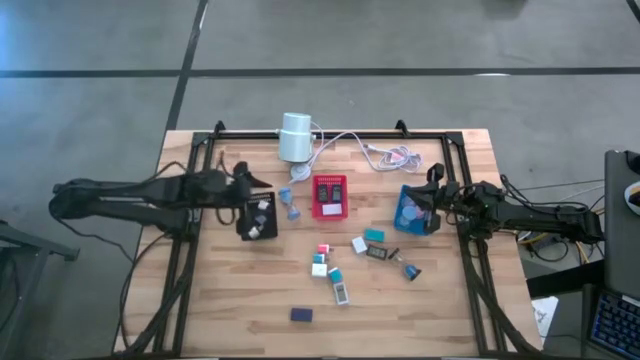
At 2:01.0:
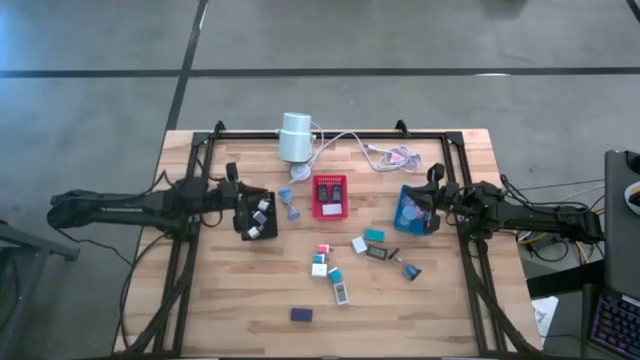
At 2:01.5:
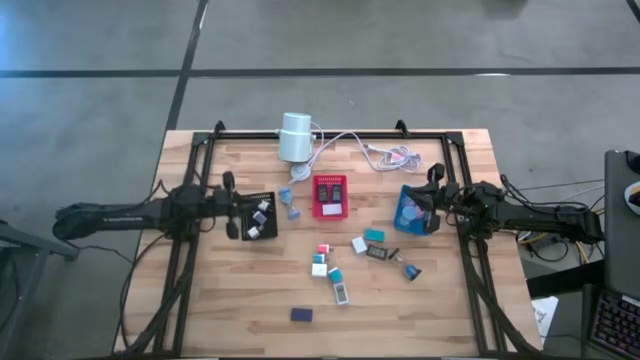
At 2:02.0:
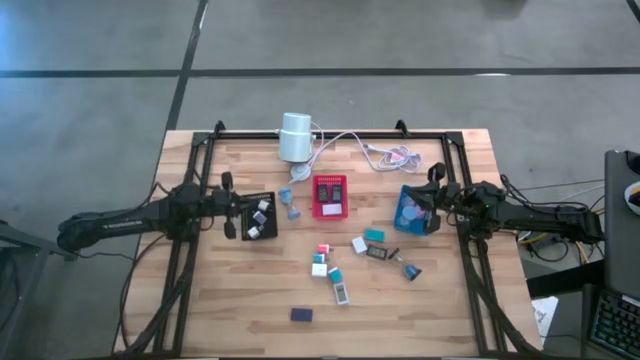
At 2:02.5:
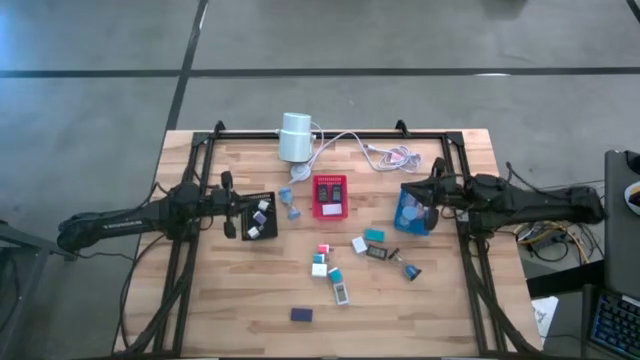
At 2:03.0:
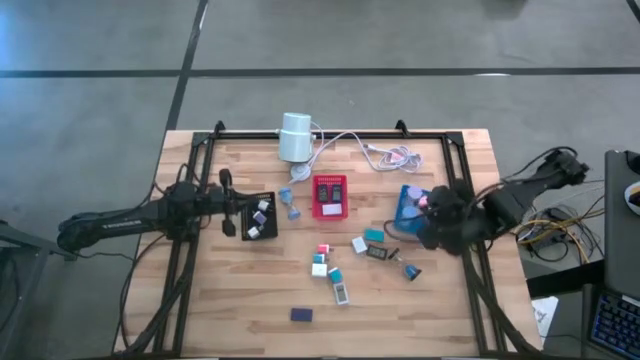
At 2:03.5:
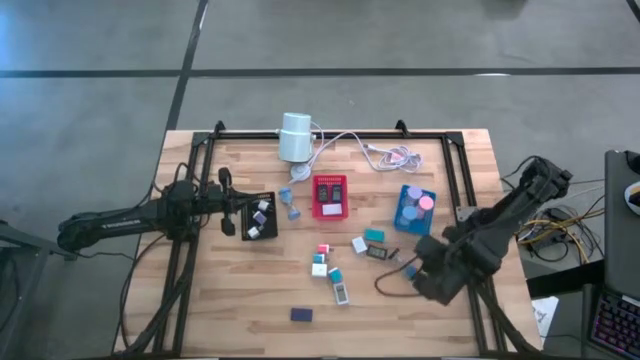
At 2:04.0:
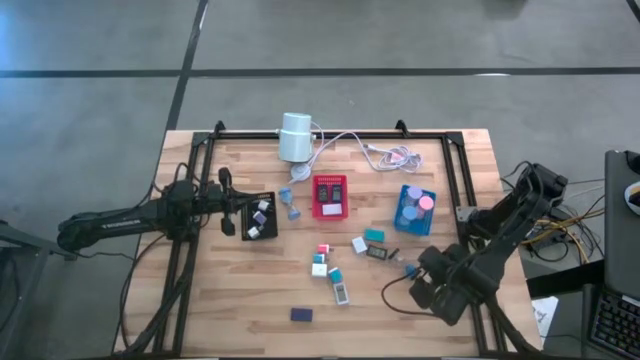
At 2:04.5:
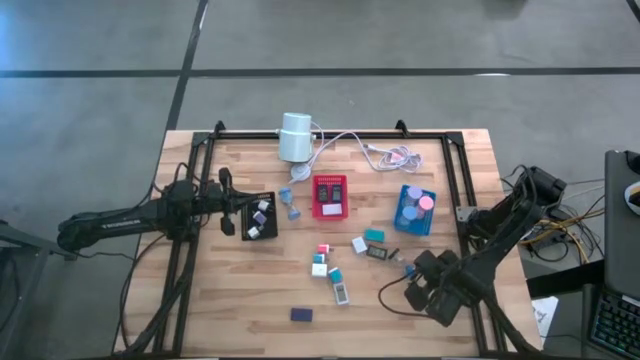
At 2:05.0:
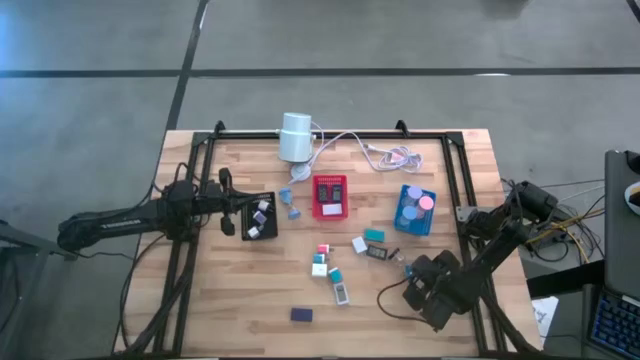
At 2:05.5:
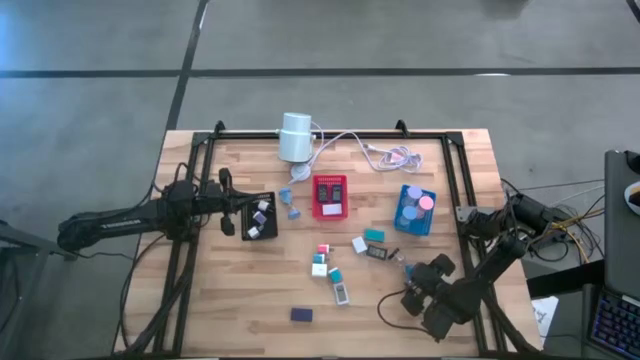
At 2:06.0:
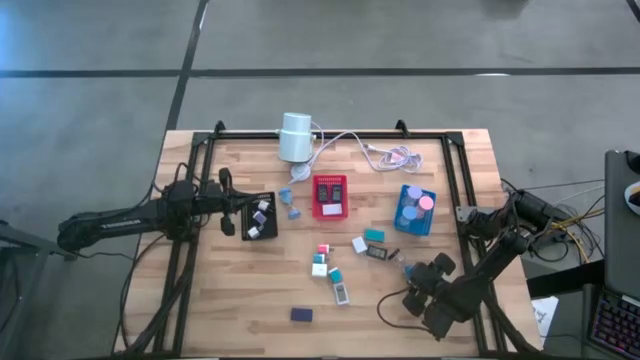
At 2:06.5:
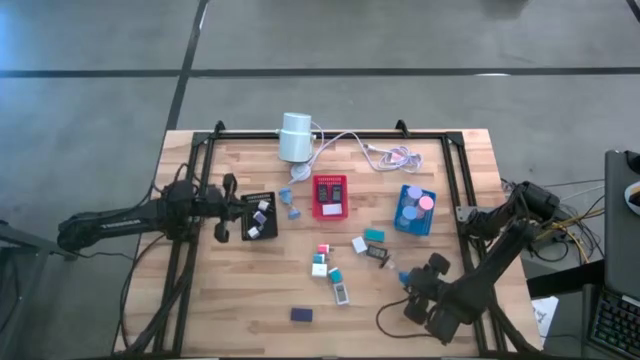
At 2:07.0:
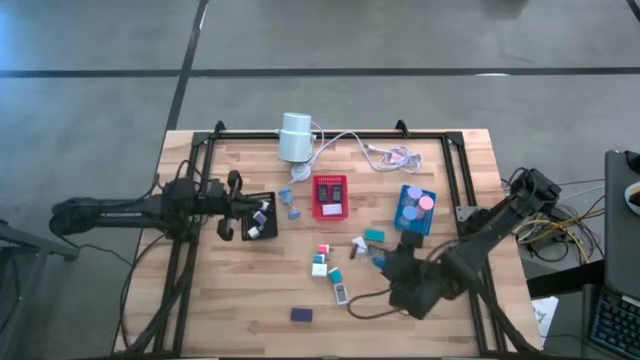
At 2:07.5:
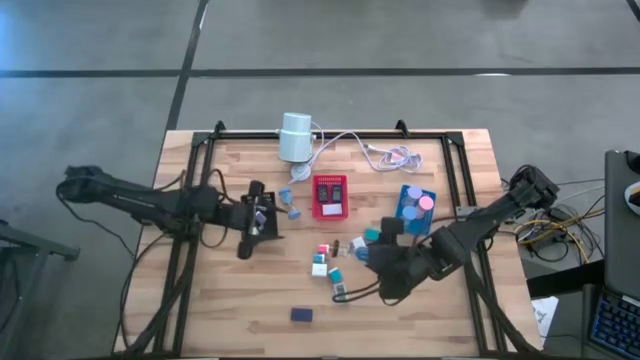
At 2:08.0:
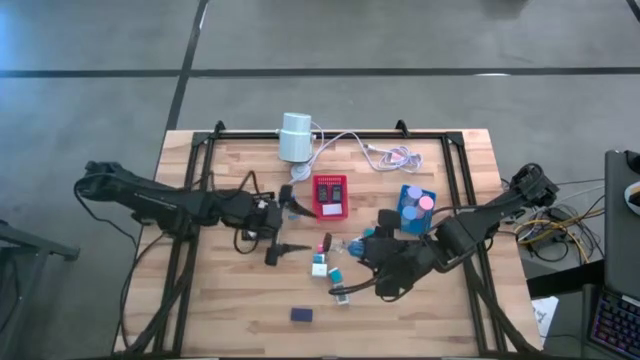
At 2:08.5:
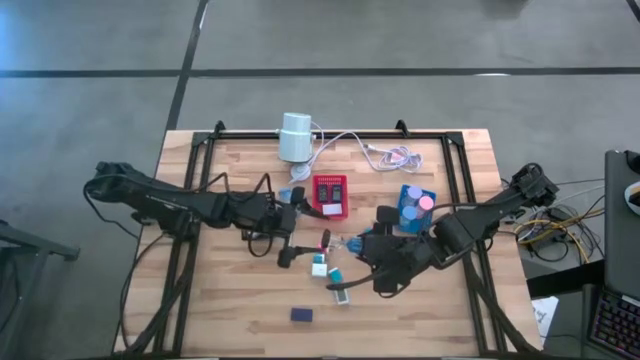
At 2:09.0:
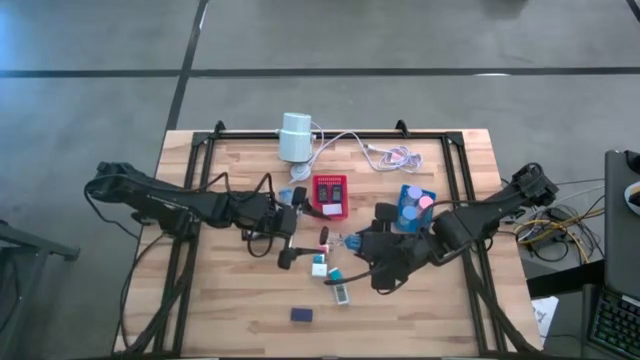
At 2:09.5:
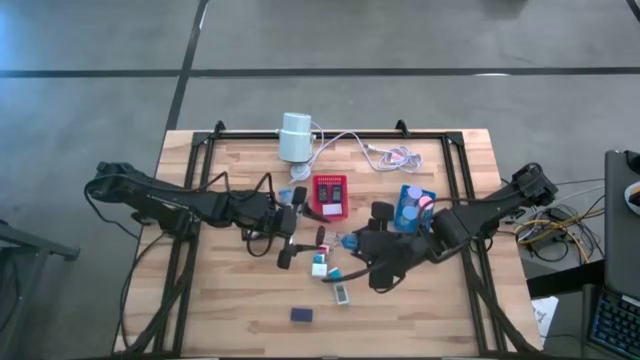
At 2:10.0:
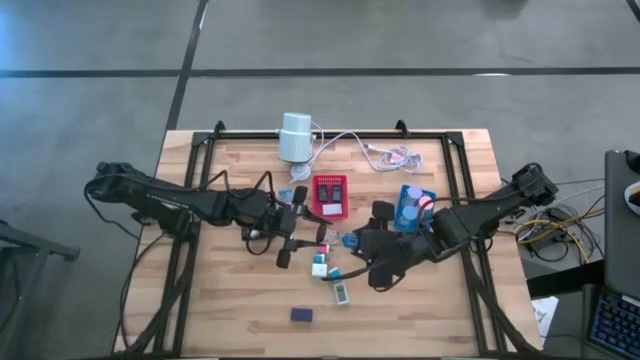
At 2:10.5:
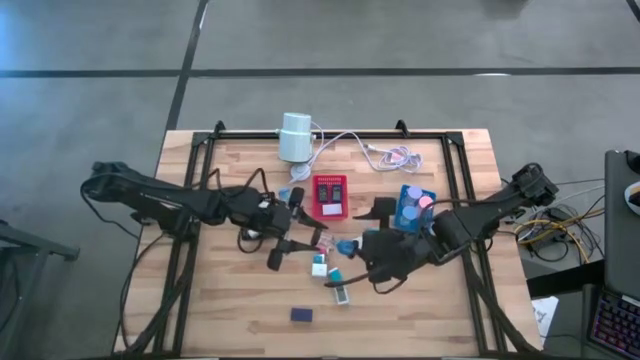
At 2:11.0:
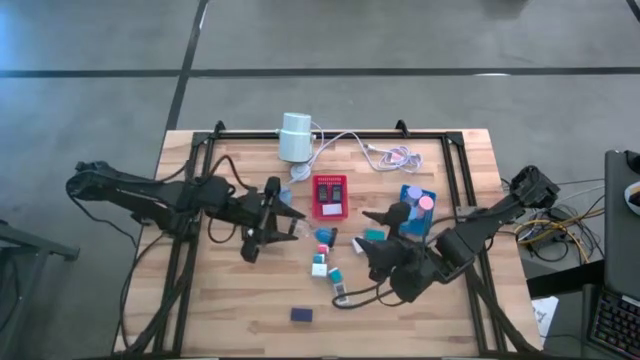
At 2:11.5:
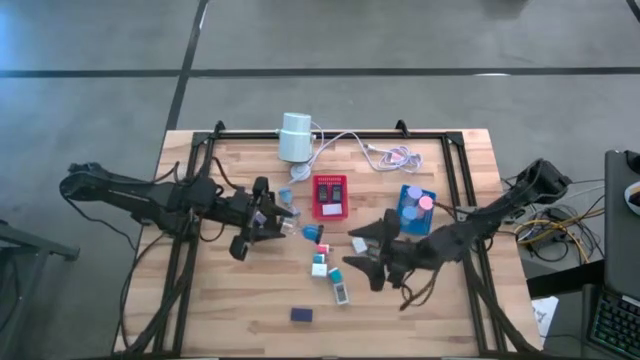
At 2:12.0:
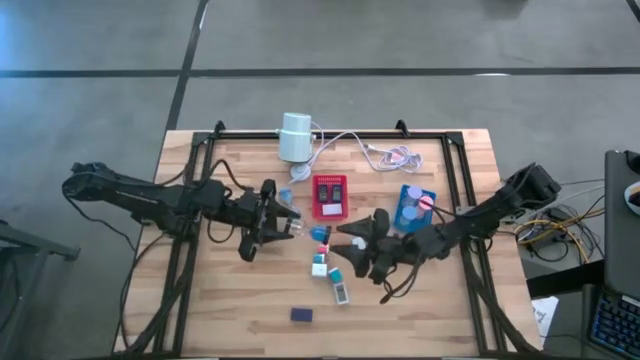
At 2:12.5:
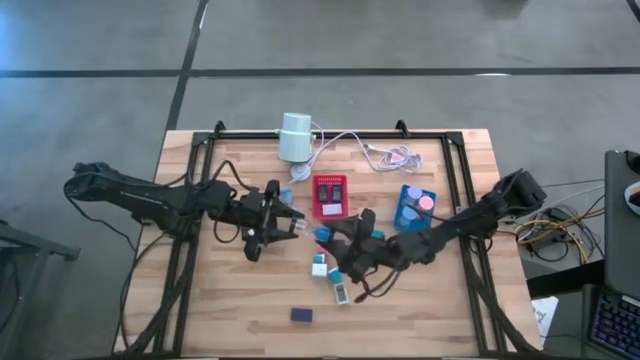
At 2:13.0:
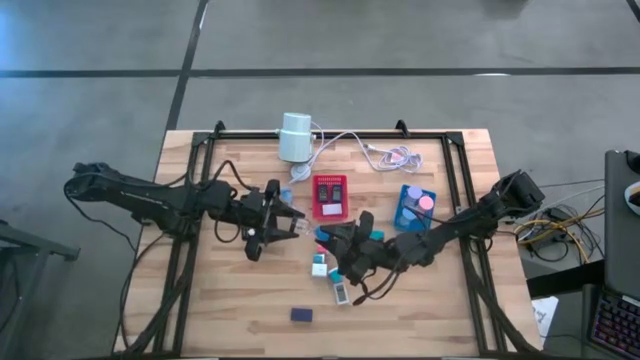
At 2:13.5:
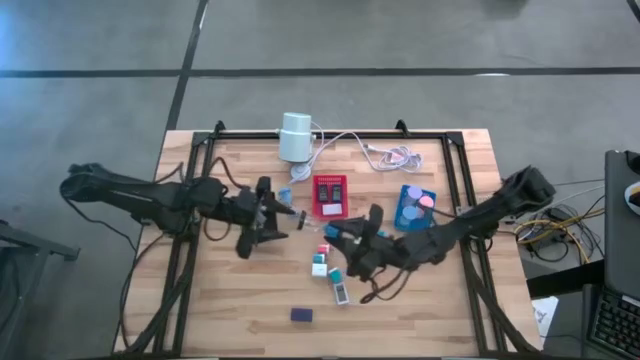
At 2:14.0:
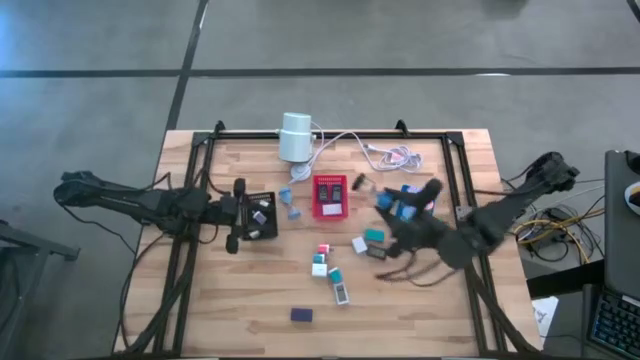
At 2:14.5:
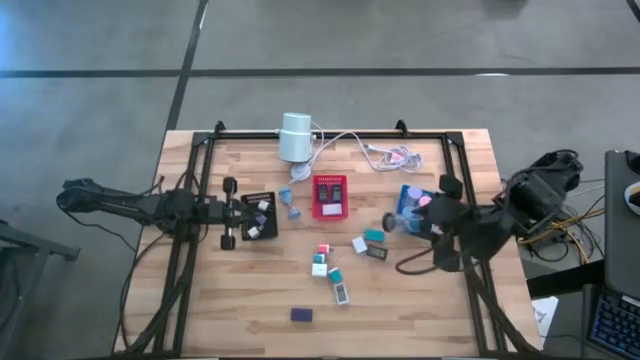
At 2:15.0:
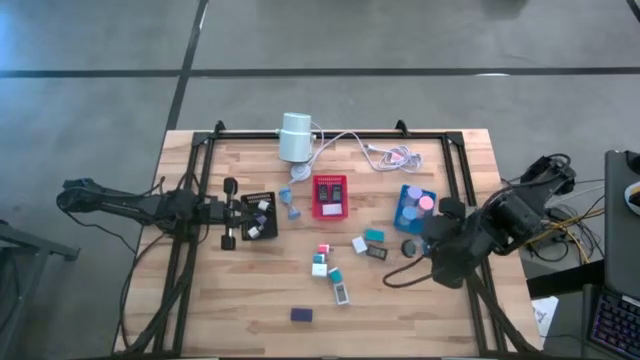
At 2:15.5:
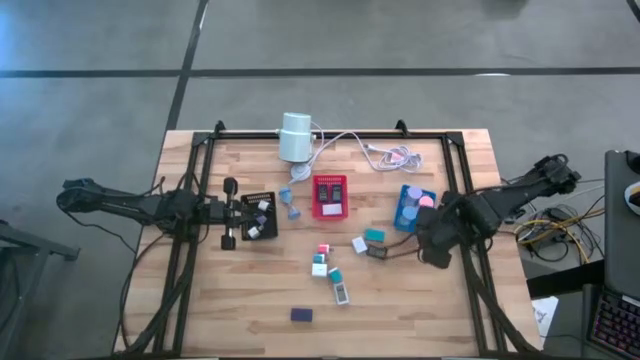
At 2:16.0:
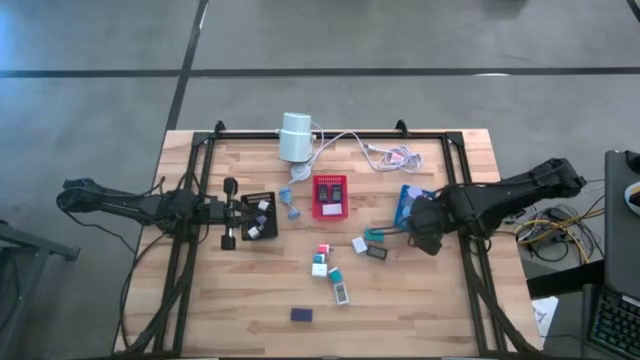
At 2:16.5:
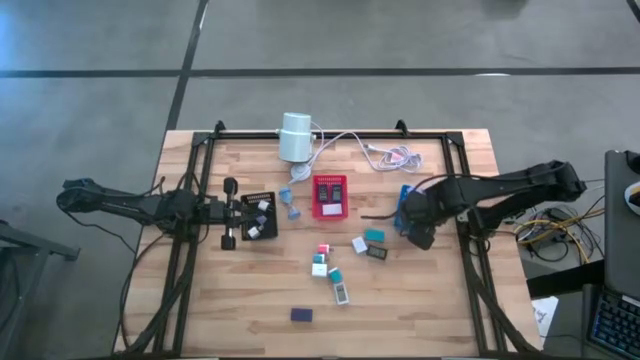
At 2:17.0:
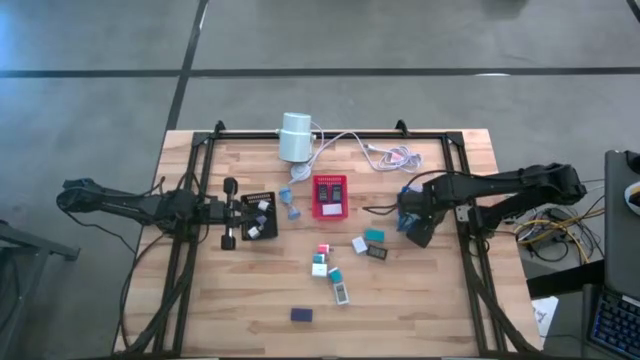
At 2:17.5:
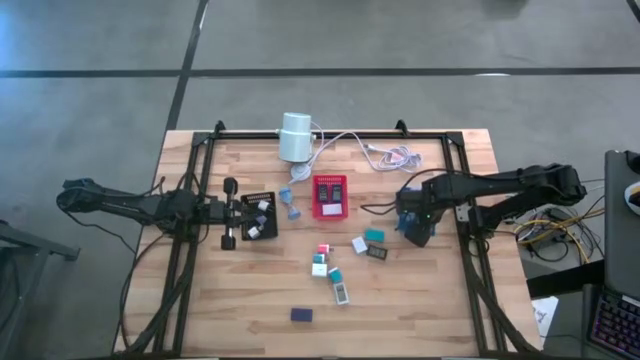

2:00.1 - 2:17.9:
Task: Pick & Place Office items
Put the blue hourglass into the blue basket

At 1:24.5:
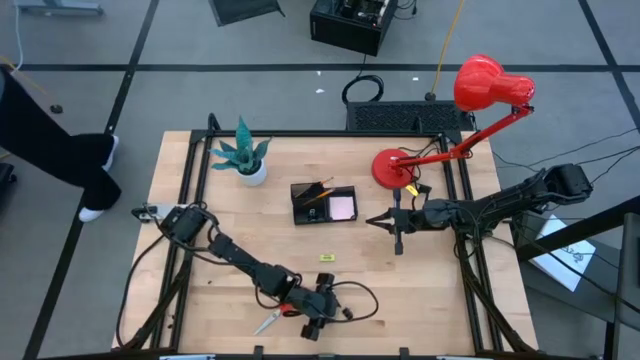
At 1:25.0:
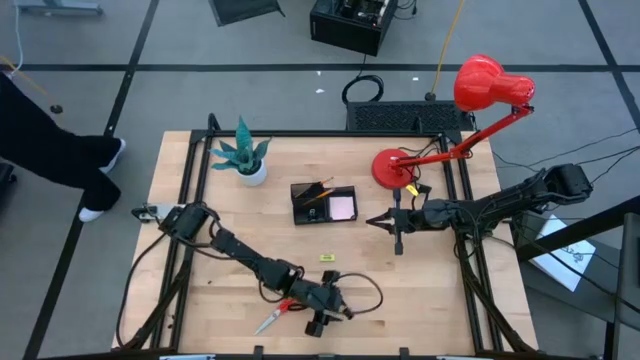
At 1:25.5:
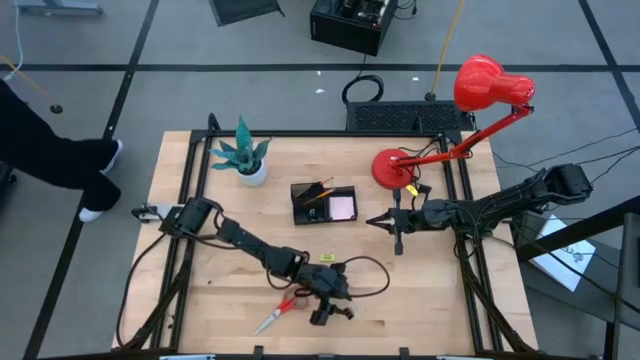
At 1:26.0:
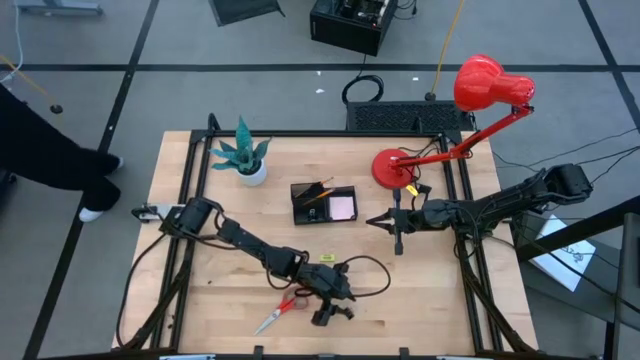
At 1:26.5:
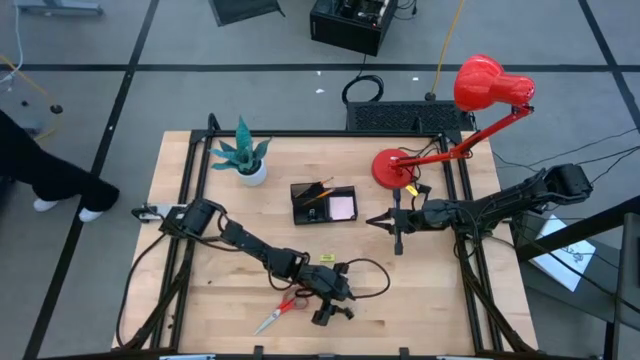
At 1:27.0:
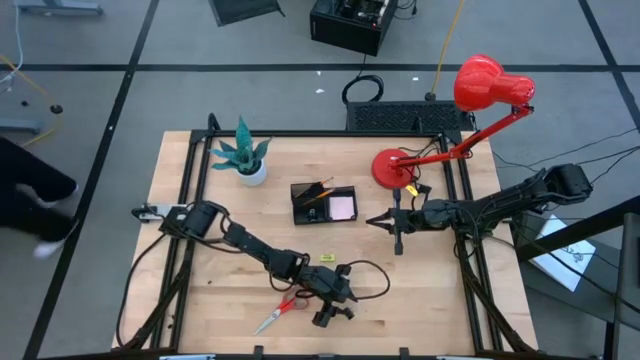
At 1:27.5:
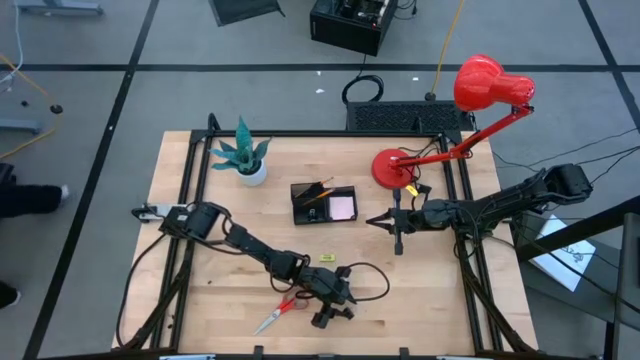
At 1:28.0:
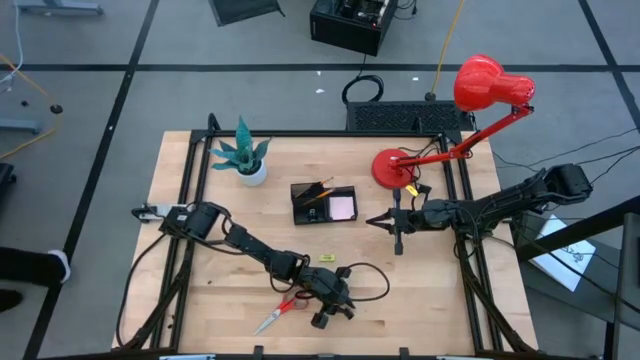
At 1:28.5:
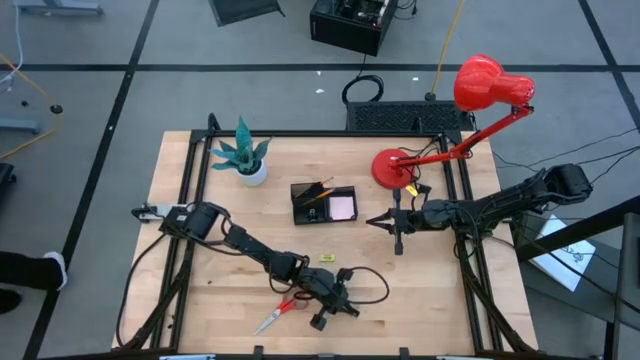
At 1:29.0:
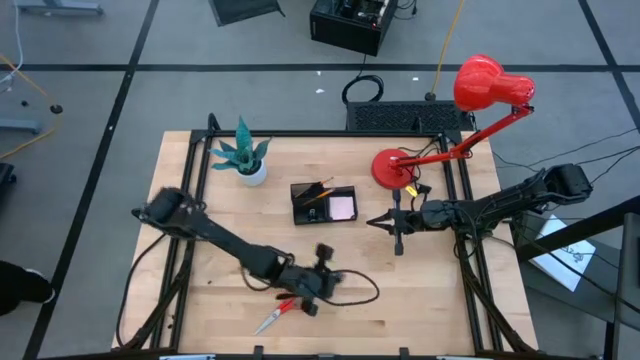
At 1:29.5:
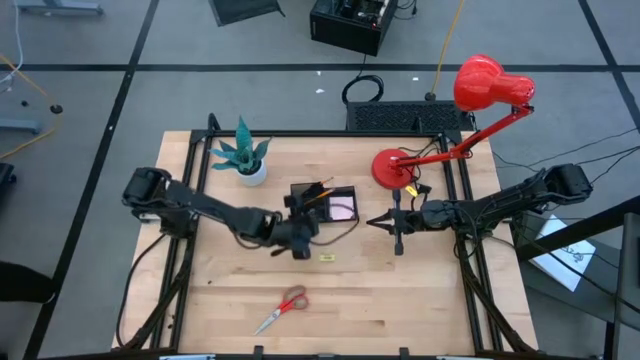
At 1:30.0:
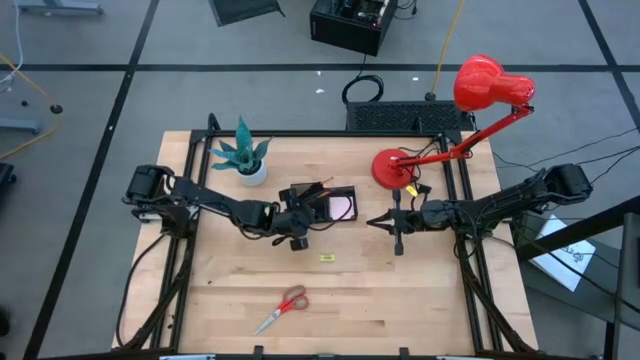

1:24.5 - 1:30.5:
Task: Pick and place office supplies into organizer
Put the black binder clip into the black desk organizer
